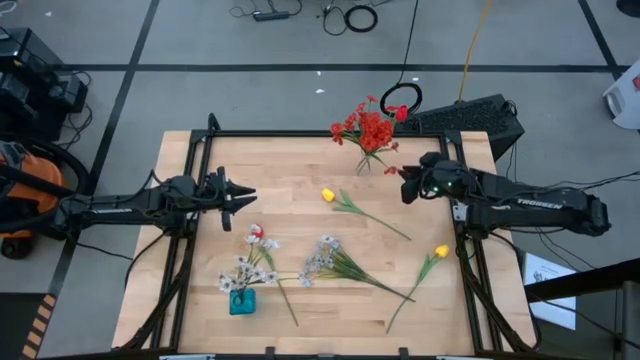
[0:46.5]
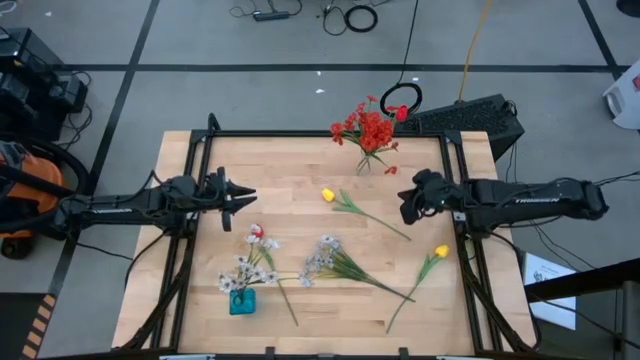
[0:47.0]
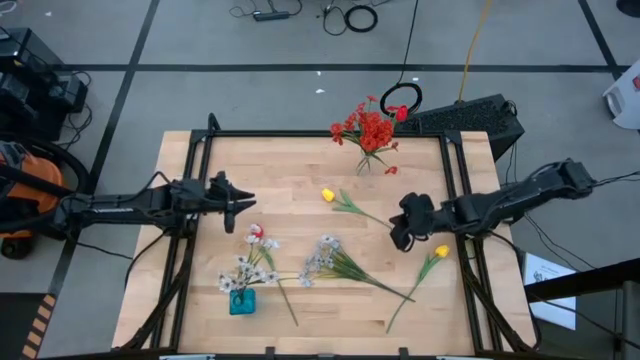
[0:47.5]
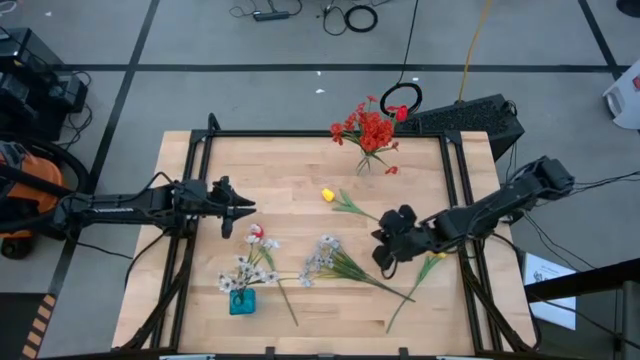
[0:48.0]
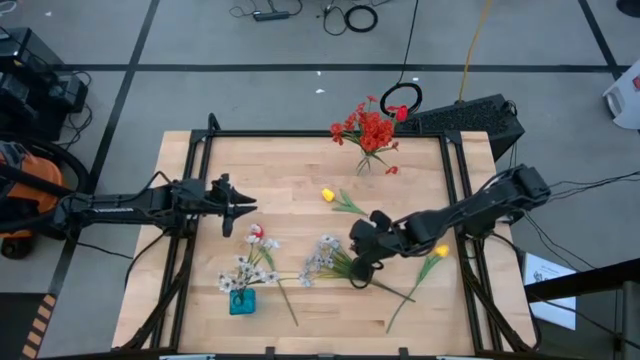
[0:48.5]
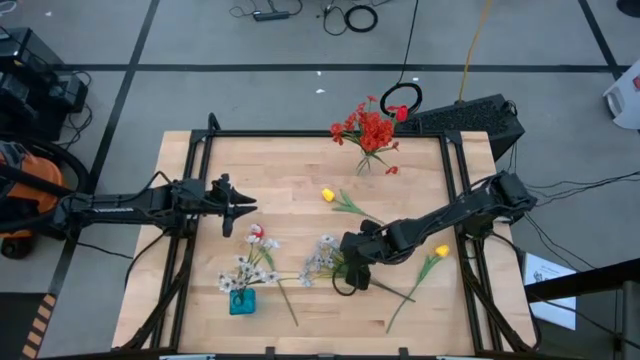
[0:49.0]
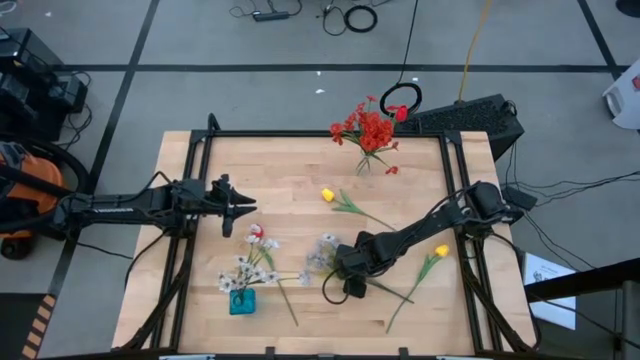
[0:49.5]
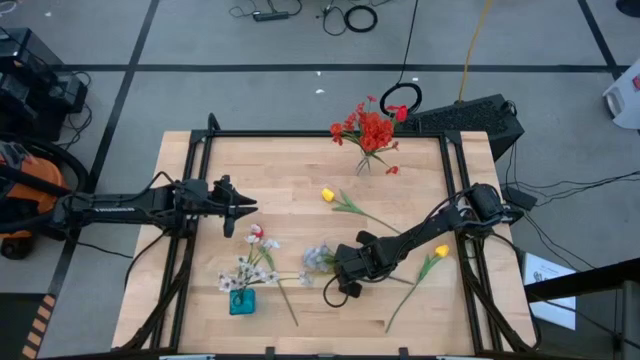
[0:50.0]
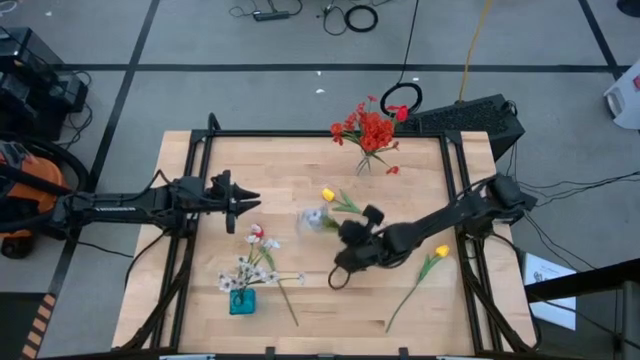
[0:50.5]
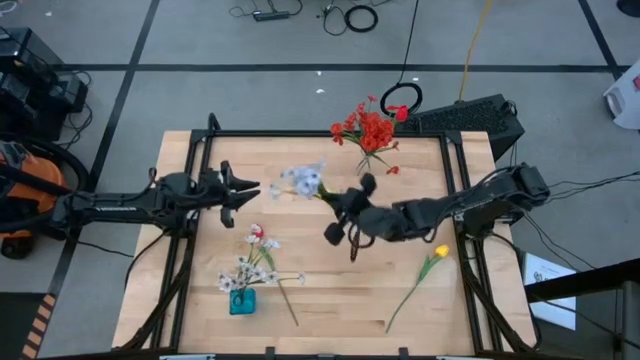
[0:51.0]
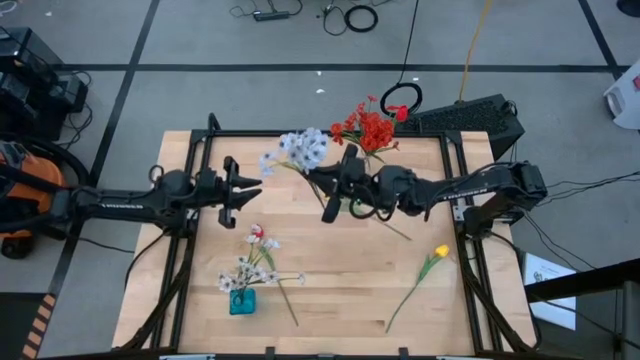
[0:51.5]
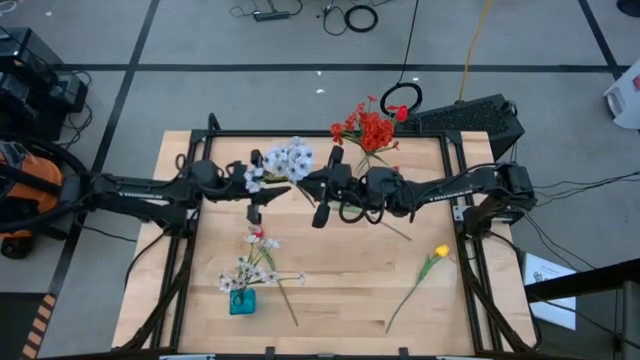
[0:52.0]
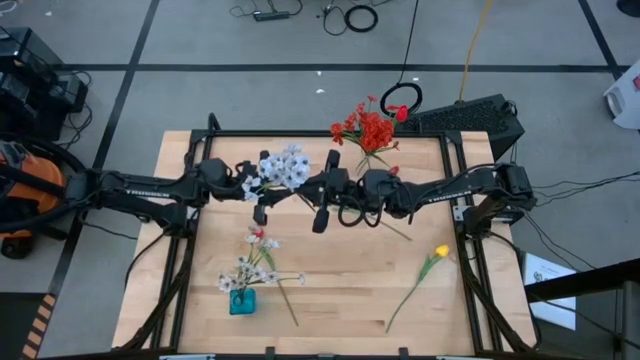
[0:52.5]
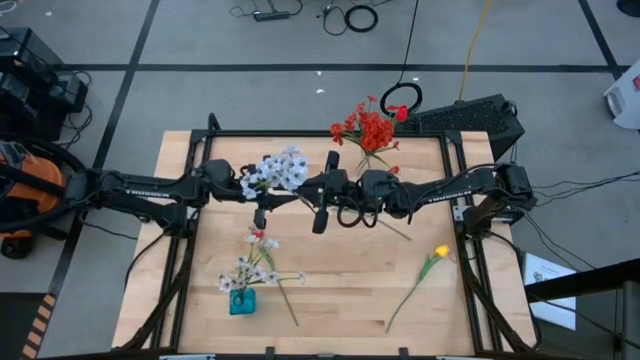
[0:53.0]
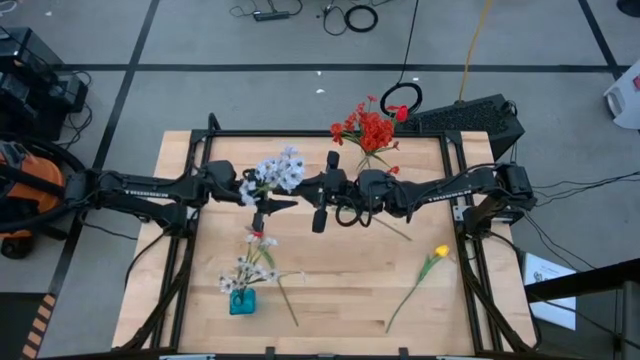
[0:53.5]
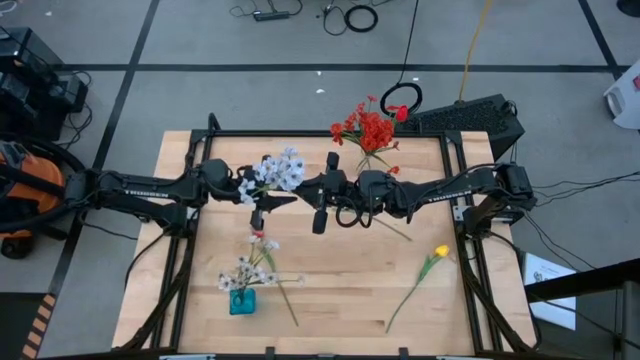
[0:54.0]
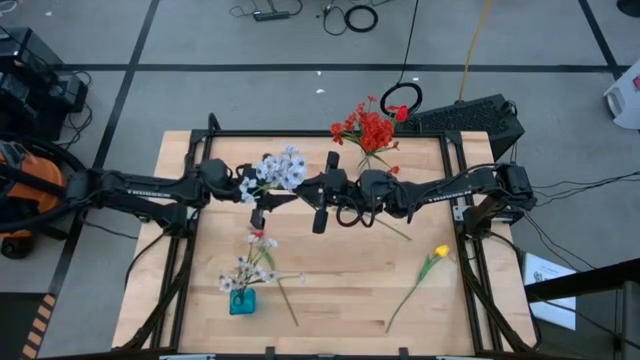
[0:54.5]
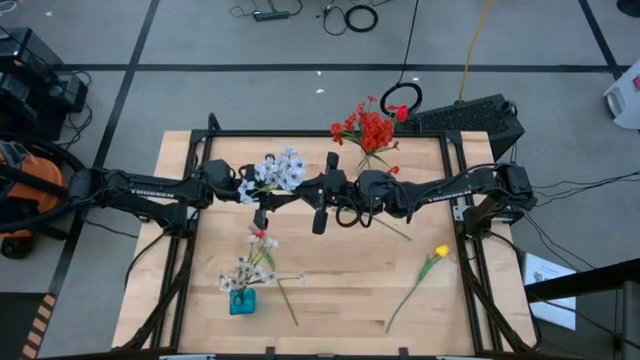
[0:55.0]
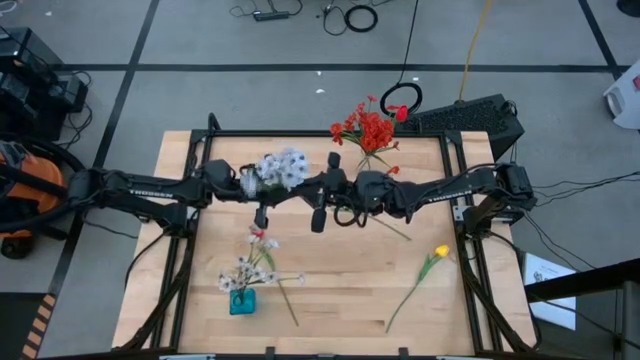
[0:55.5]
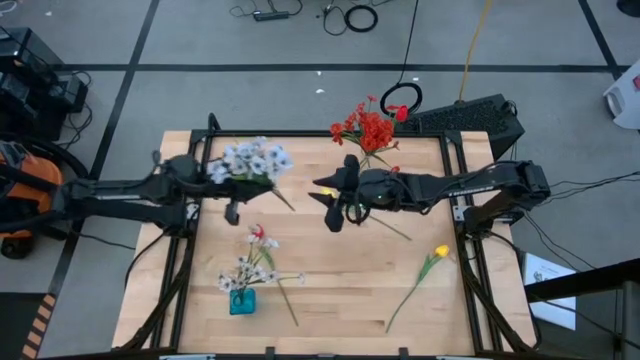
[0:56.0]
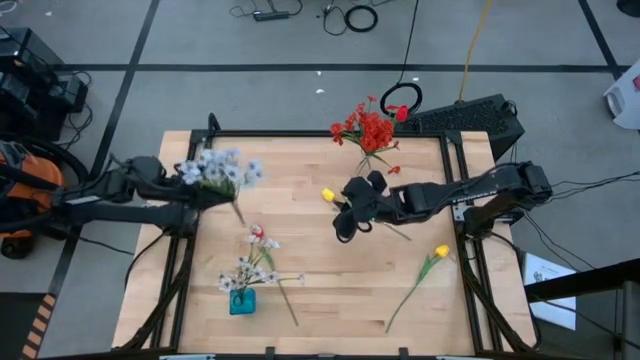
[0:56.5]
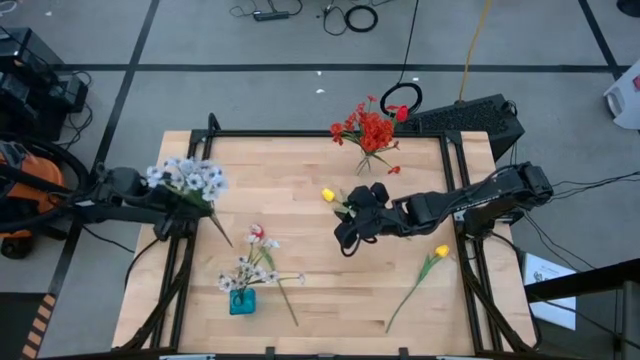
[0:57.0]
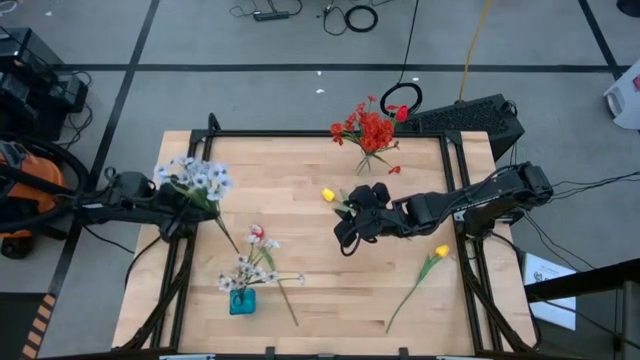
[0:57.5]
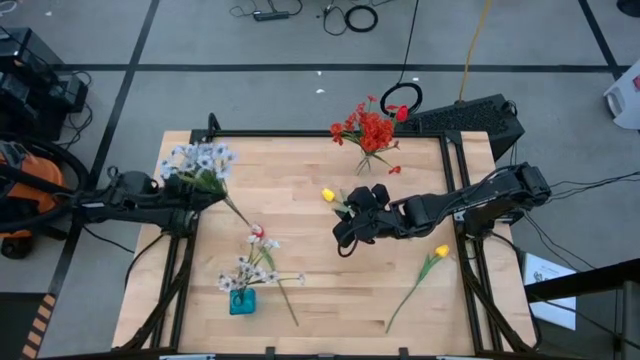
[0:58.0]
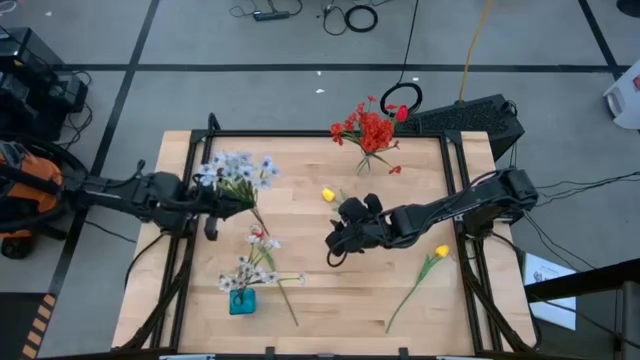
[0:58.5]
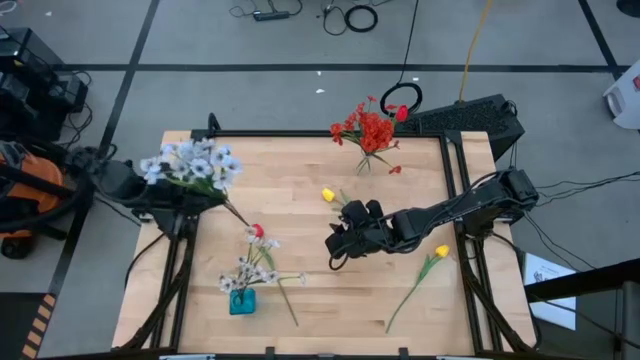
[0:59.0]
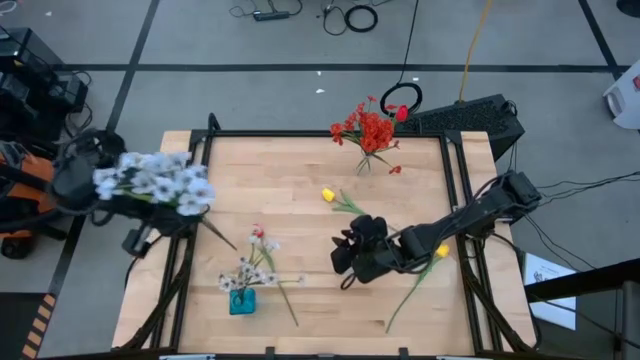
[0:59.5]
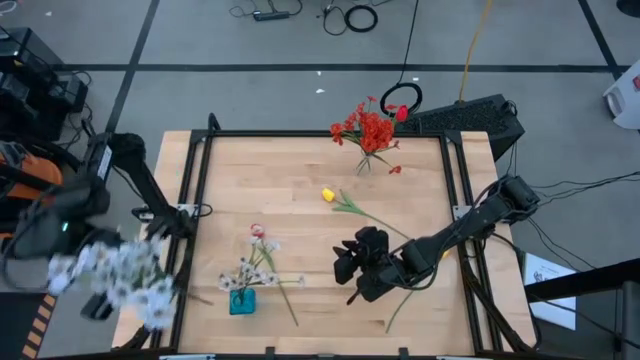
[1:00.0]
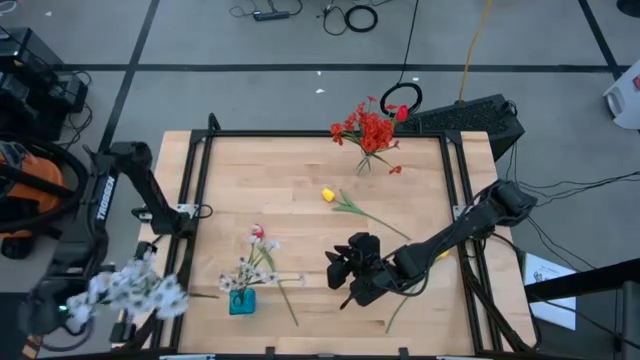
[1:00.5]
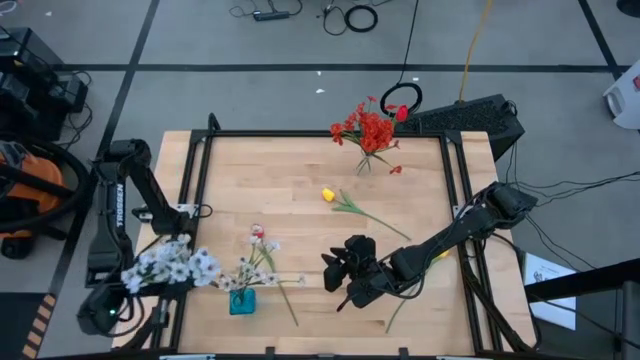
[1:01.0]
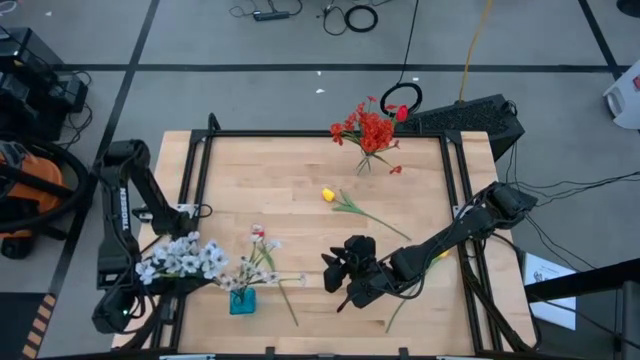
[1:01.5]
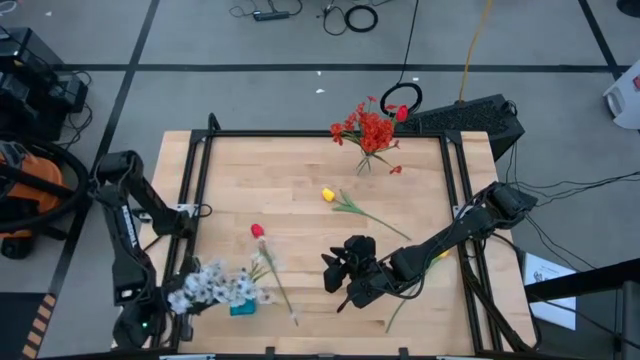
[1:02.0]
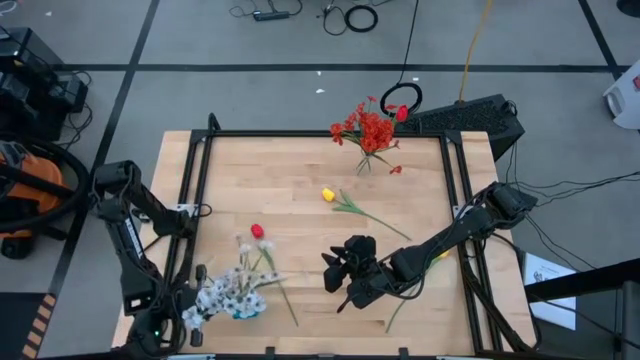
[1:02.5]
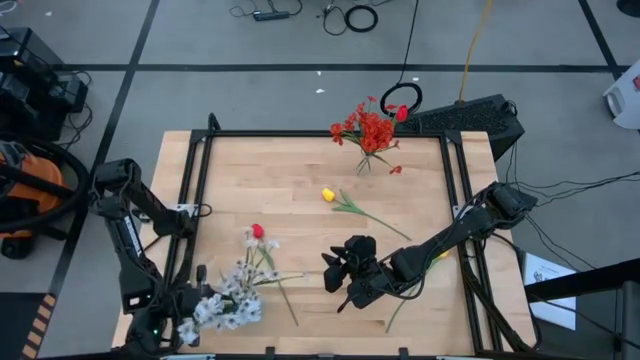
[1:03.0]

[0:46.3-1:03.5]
Task: Sort flowers into vase by color
Put the white flower into the blue flower vase
